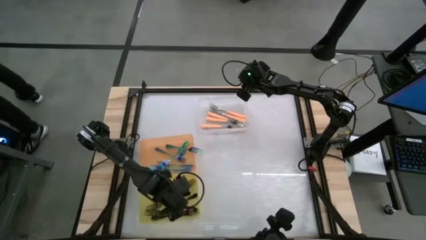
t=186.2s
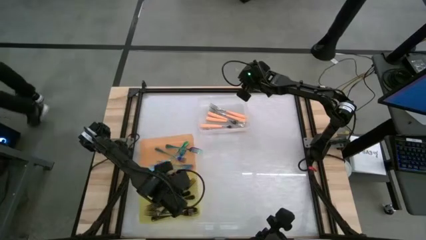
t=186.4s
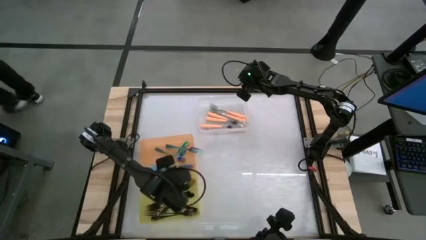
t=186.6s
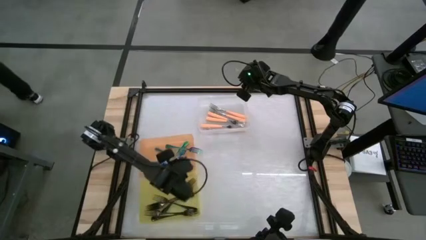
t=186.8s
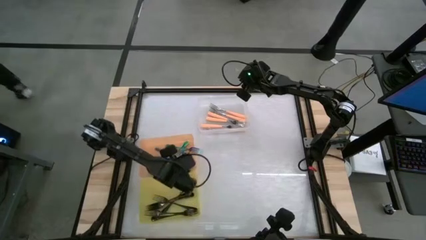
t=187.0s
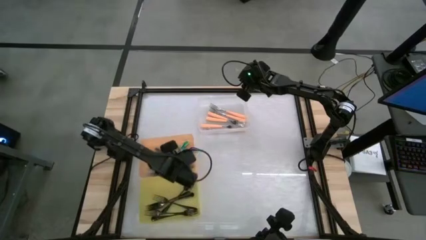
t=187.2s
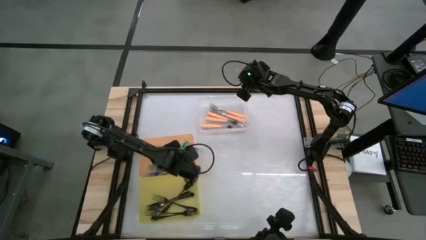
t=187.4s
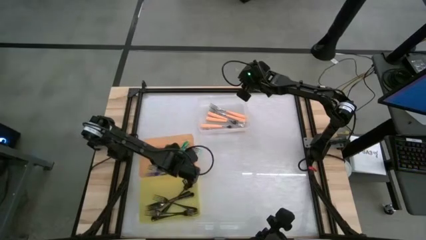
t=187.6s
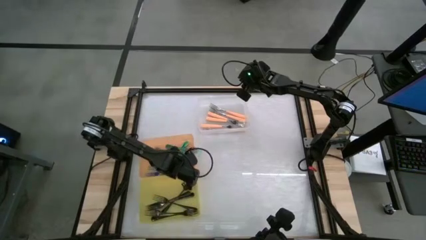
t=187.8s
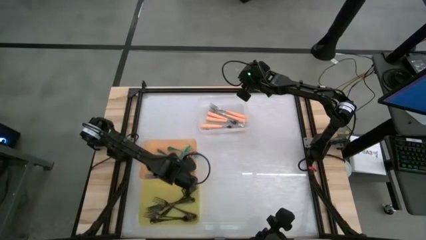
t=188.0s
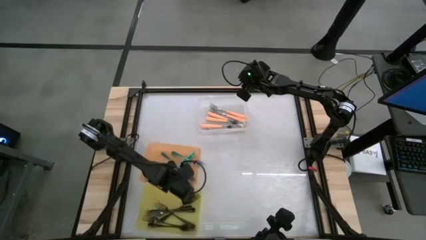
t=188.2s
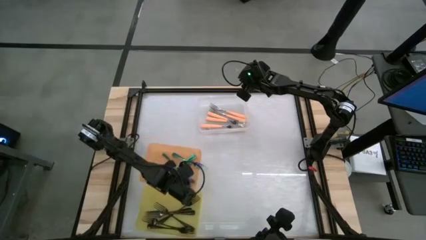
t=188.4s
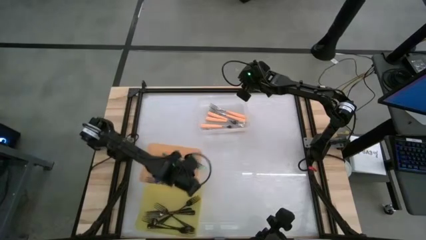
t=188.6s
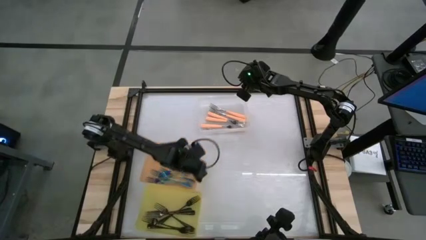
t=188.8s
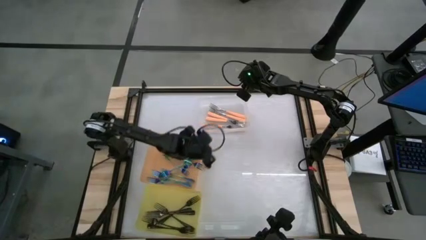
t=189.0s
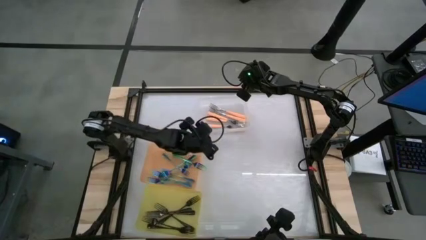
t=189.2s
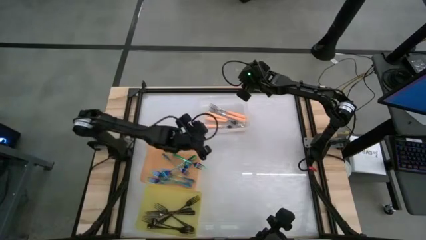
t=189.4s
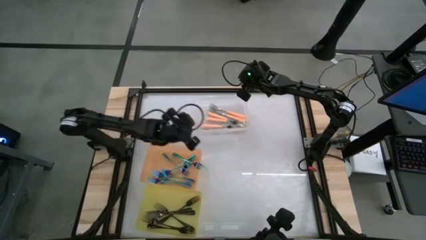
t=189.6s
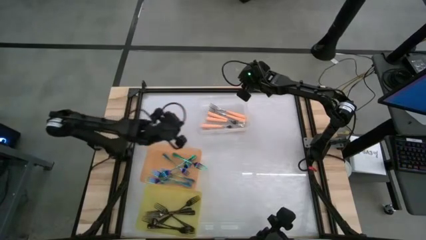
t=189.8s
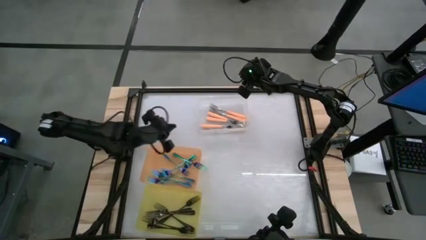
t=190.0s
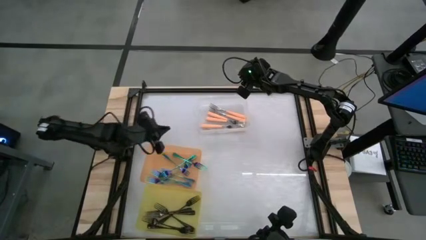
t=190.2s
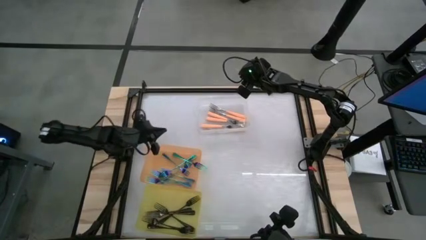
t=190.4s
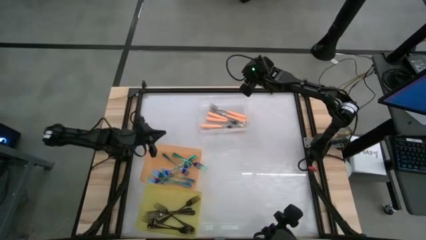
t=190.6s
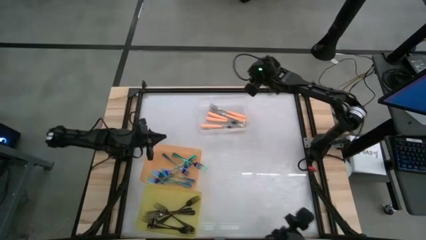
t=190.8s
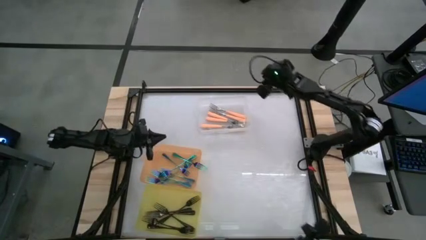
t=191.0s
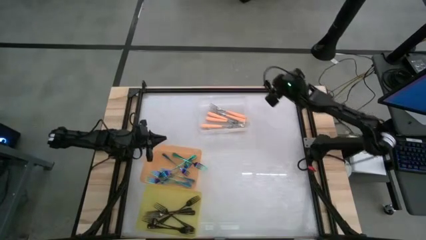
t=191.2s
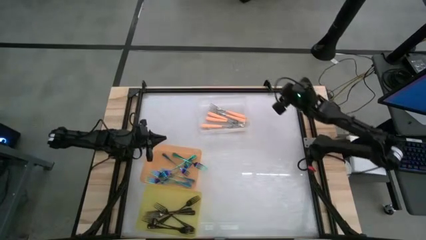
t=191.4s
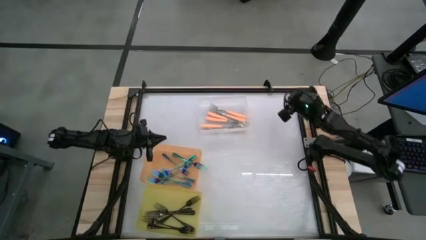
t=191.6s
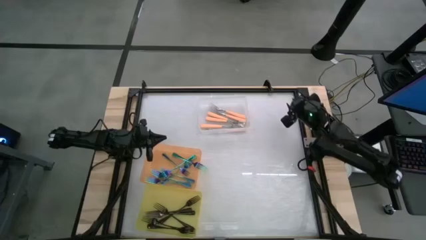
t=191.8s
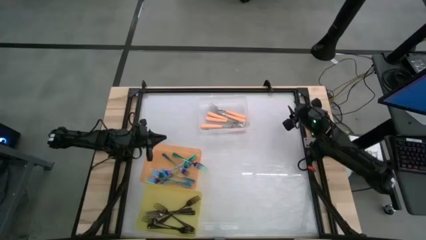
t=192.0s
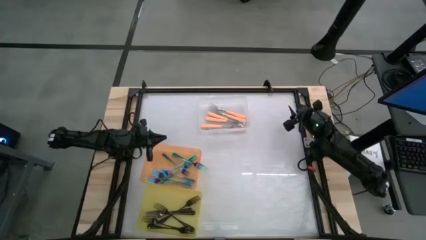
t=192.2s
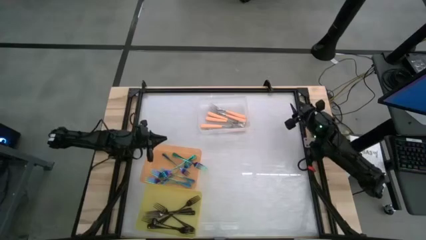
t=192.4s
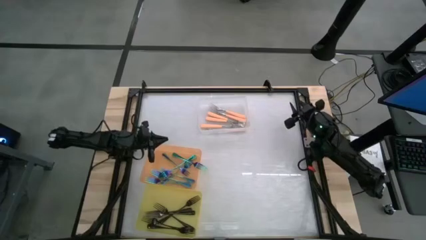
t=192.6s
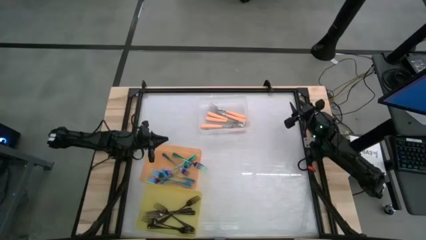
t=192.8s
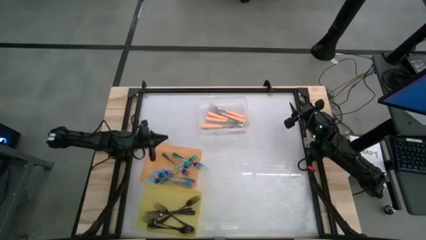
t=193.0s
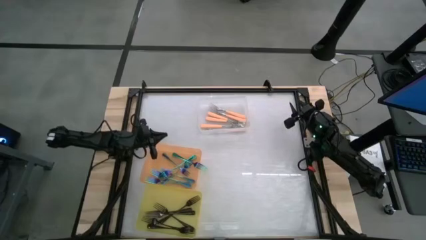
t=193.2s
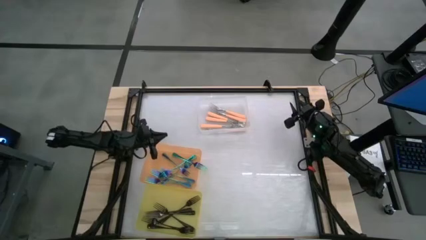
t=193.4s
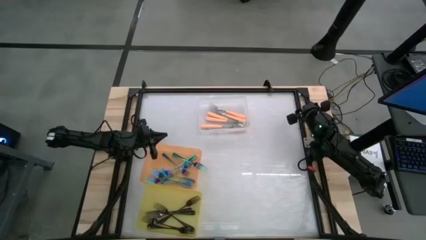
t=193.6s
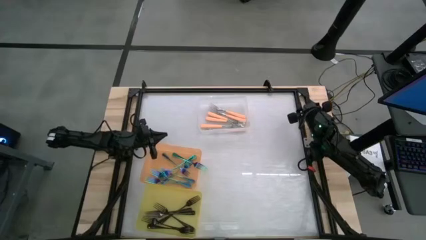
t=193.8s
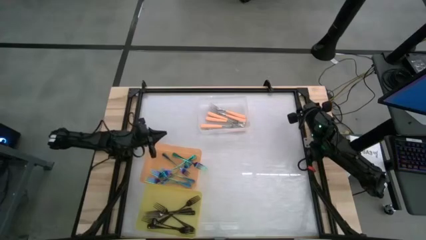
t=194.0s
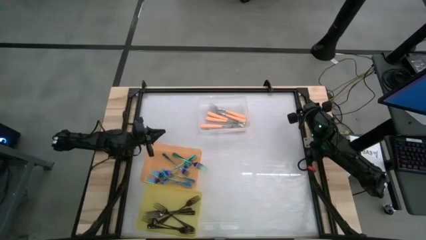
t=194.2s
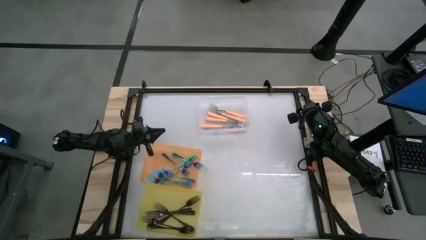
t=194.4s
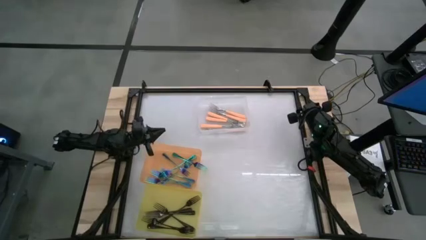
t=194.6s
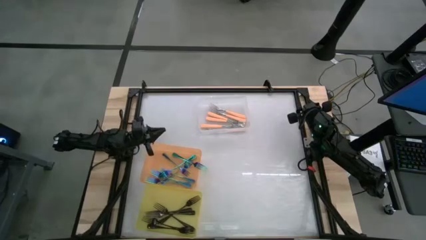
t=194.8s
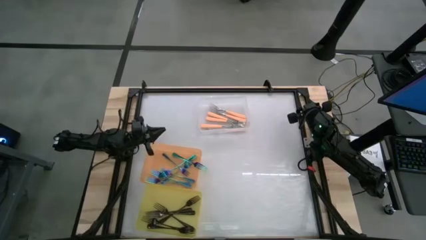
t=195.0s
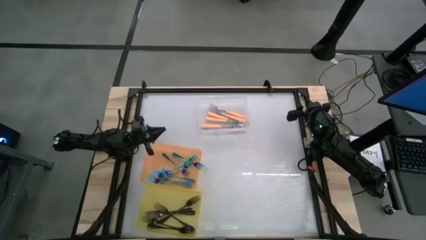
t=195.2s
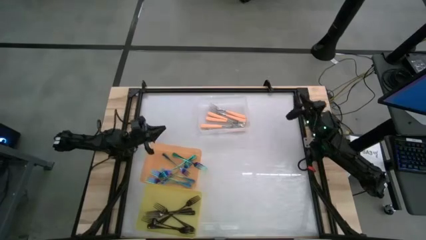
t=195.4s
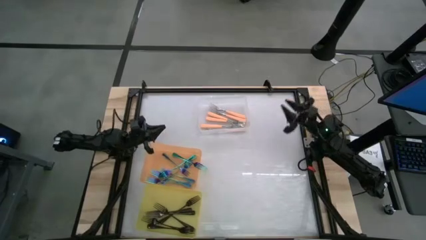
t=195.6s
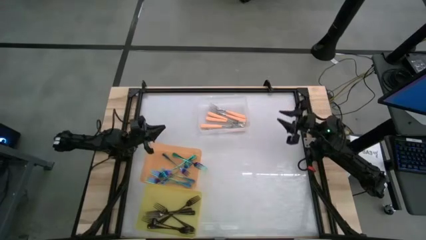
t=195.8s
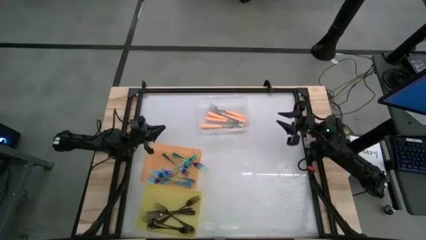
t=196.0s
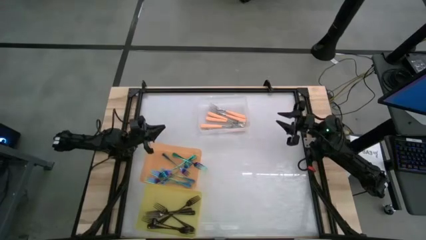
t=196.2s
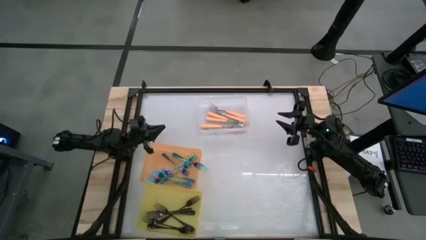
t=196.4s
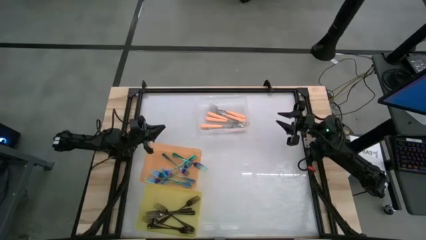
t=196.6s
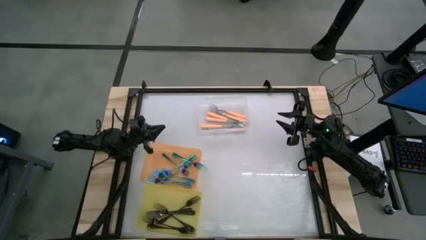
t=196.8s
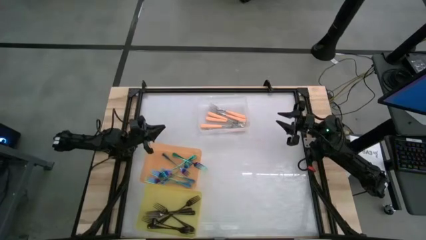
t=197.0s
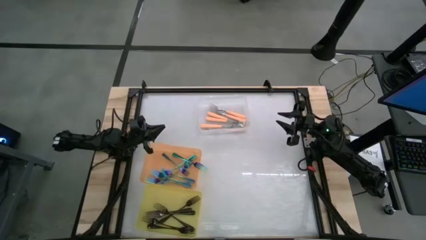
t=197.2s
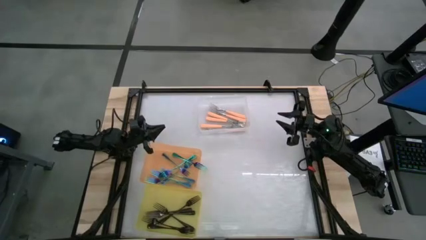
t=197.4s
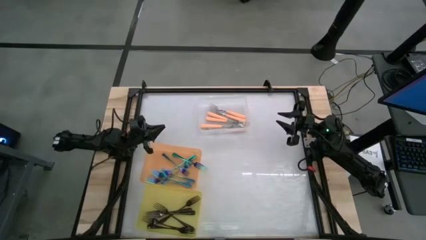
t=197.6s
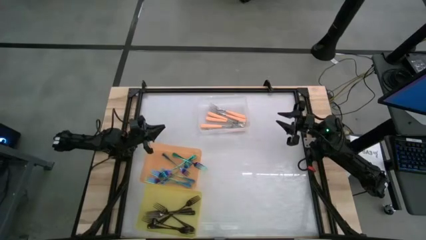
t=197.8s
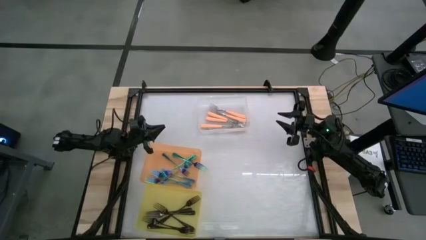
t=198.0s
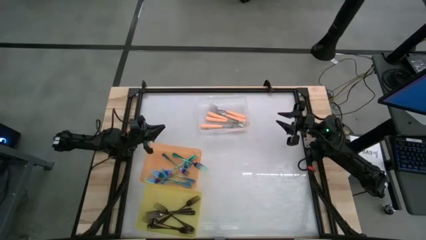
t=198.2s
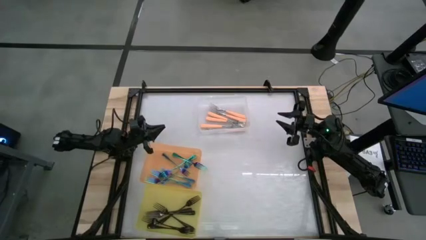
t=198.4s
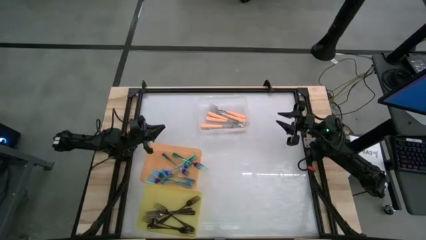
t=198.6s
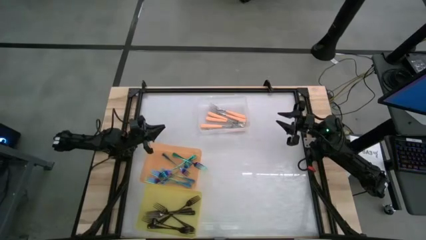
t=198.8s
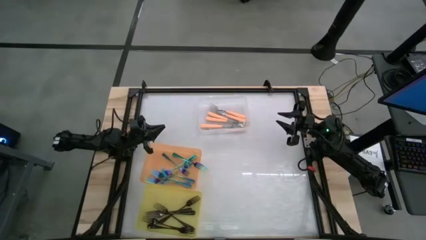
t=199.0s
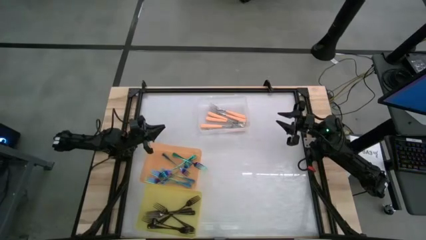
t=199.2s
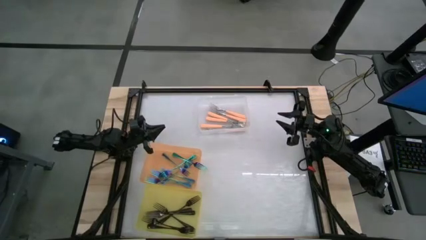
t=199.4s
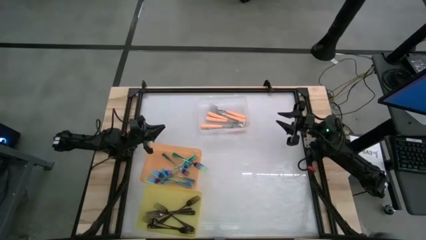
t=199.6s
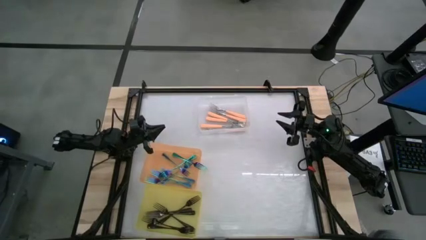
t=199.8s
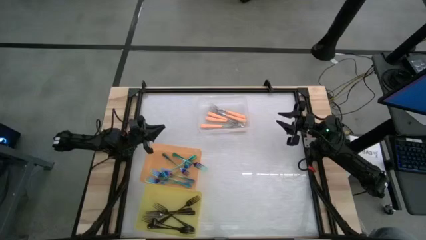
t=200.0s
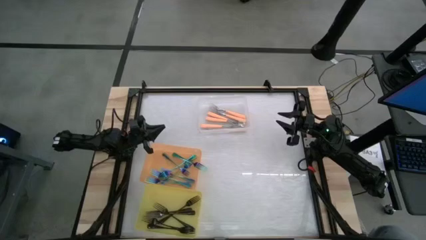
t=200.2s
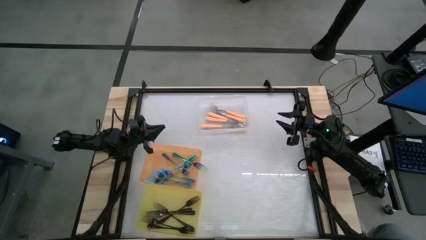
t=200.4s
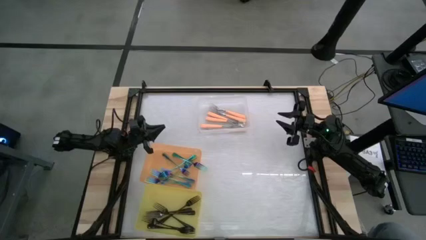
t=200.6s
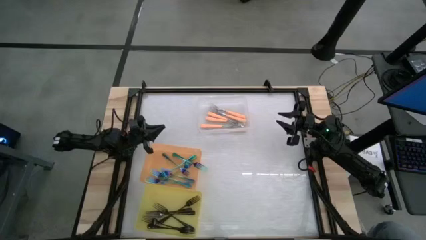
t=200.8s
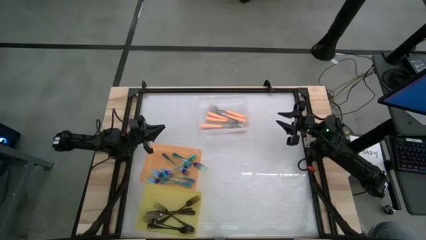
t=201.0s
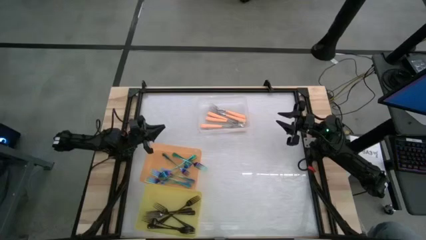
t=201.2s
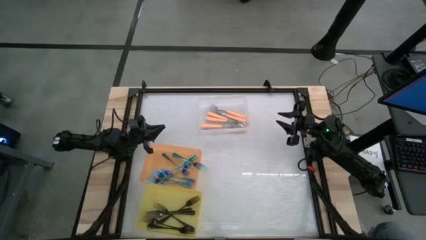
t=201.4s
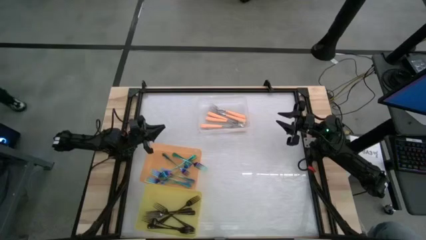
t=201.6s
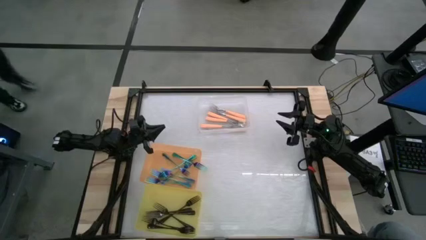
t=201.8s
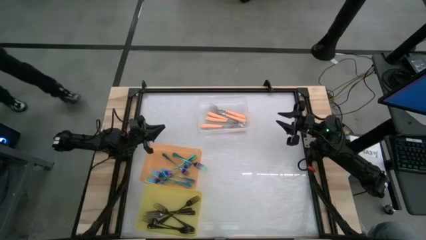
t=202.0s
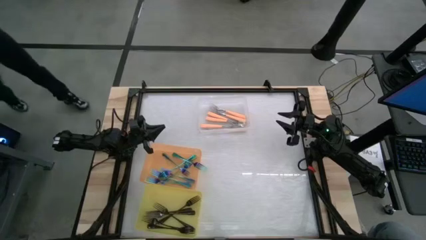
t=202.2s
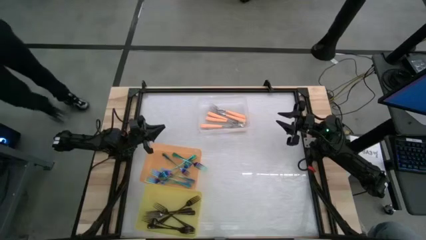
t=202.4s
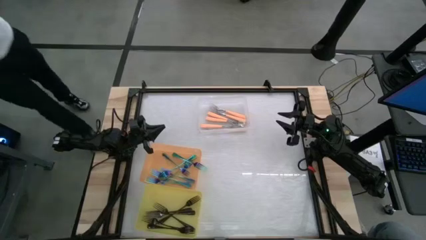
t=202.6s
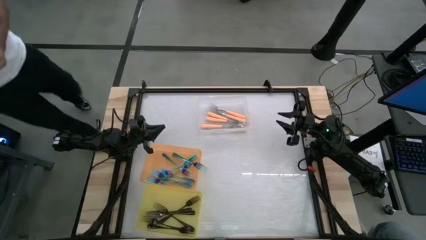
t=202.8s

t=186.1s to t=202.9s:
Task: Sort silverware by color (type)
Return to Home Position
